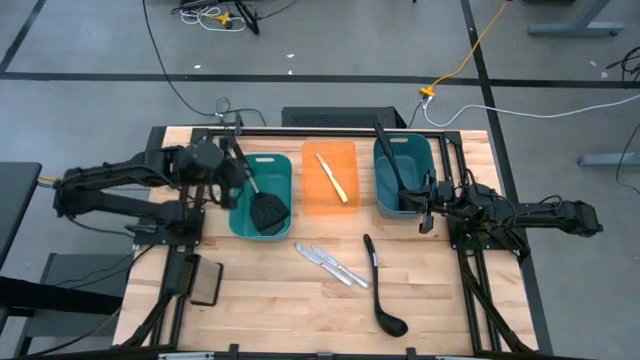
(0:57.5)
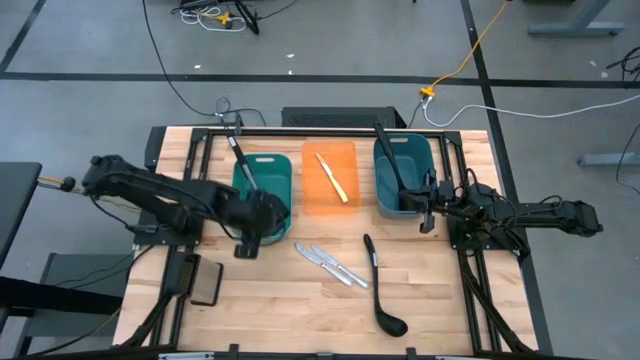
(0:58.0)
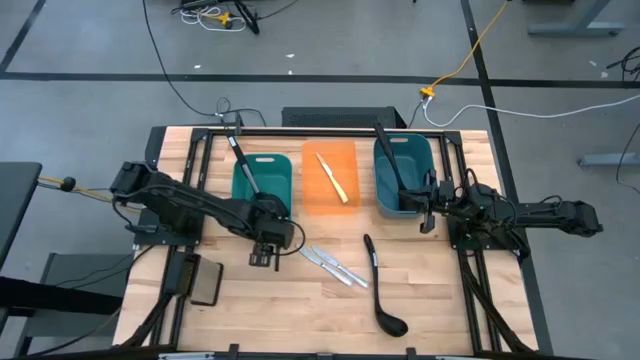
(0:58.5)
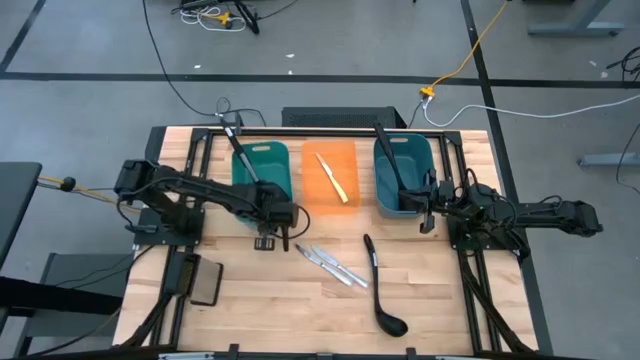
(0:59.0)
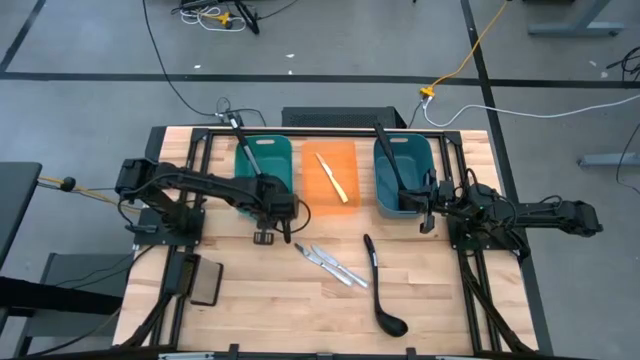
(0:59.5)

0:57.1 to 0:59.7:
Task: Pick & Place Kitchen Items
Adjust the green bin

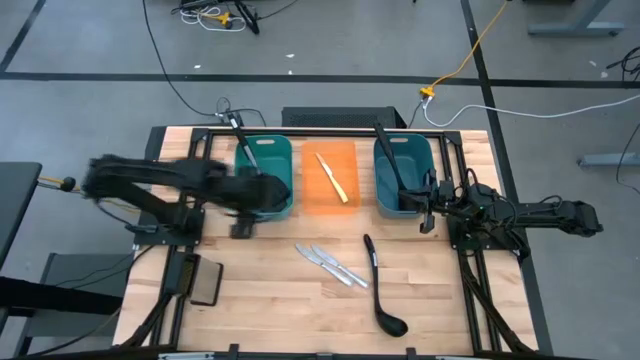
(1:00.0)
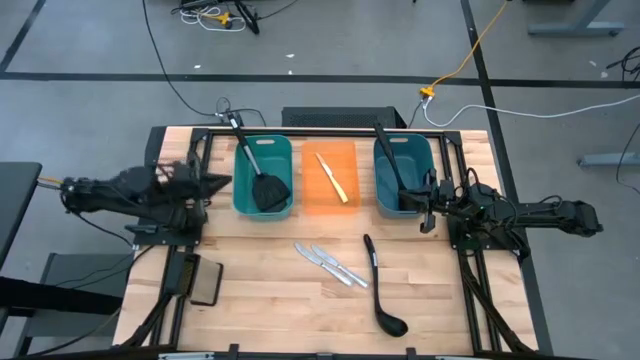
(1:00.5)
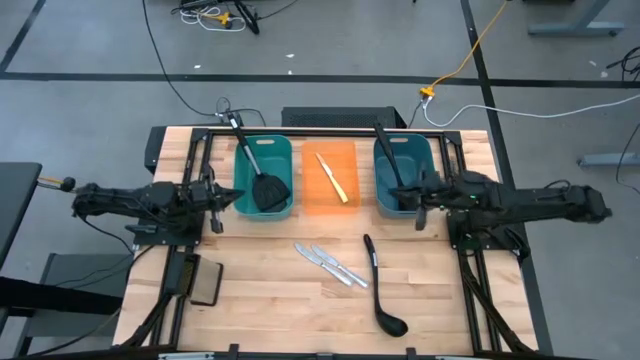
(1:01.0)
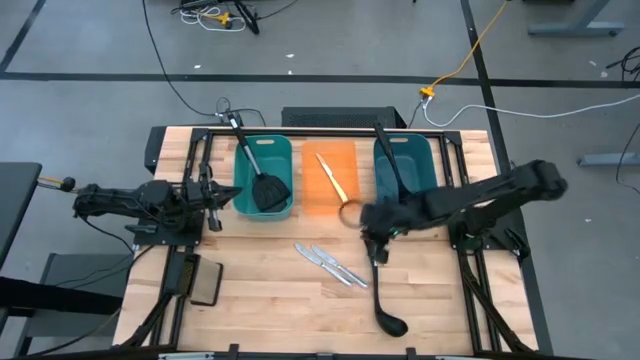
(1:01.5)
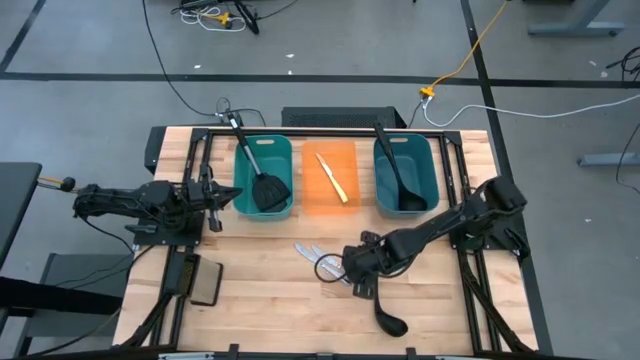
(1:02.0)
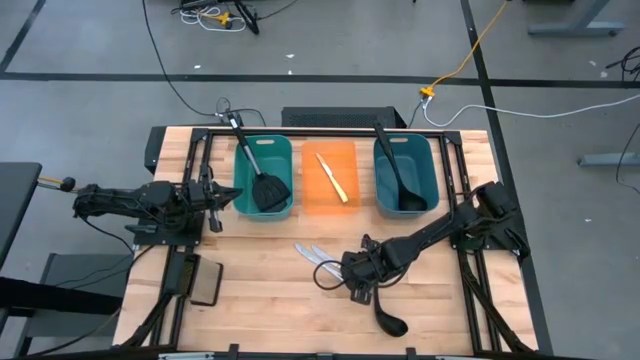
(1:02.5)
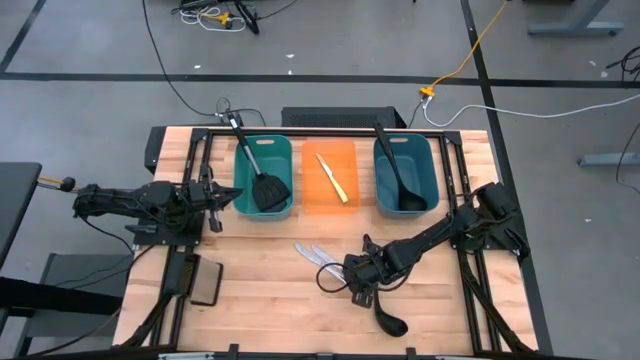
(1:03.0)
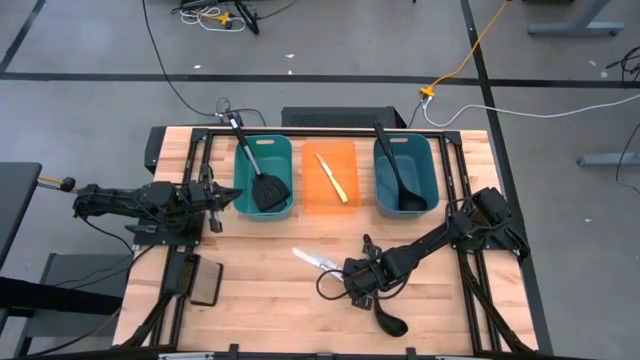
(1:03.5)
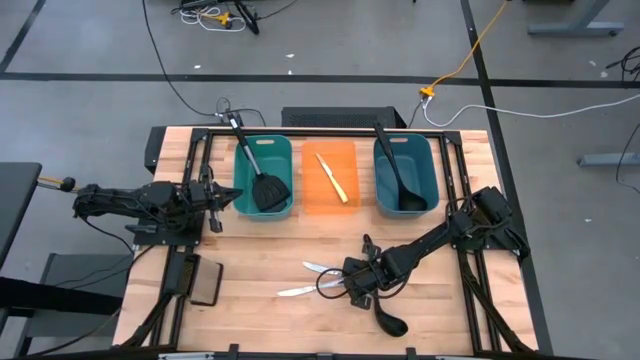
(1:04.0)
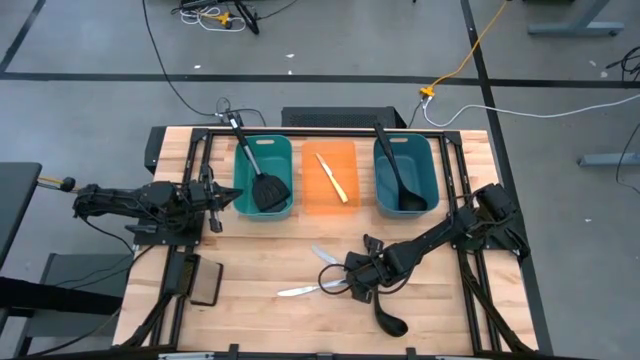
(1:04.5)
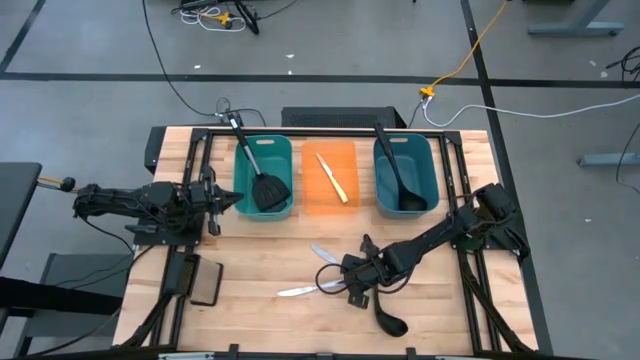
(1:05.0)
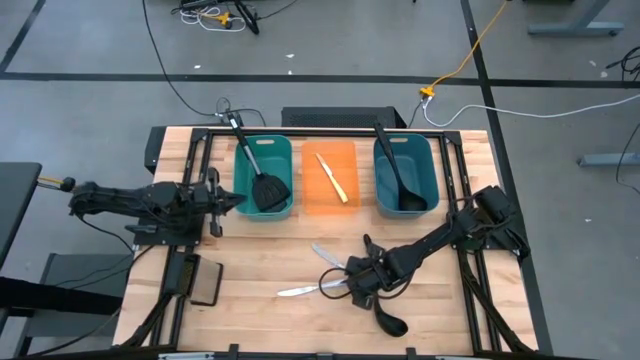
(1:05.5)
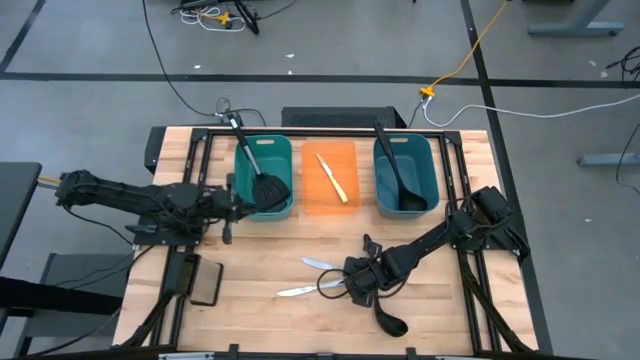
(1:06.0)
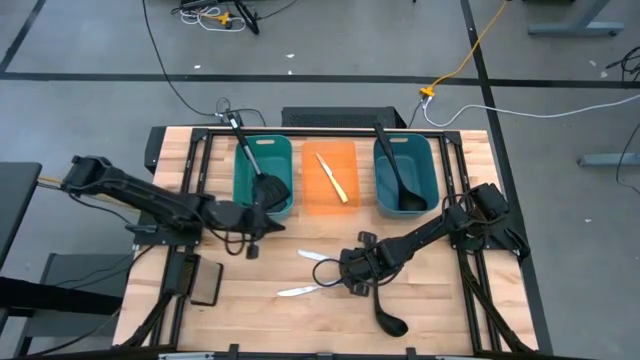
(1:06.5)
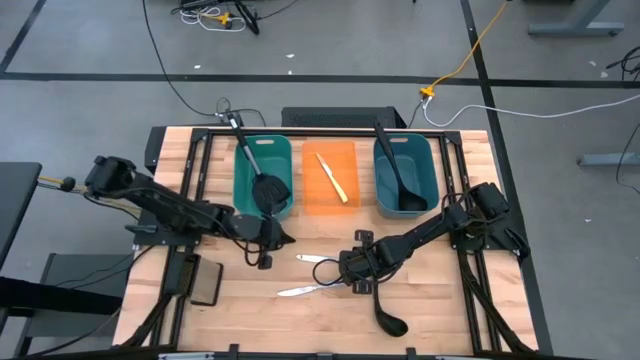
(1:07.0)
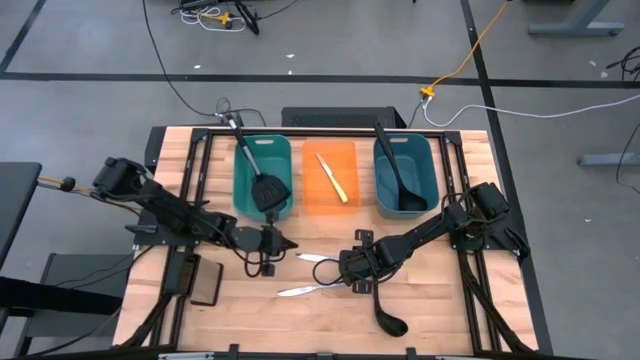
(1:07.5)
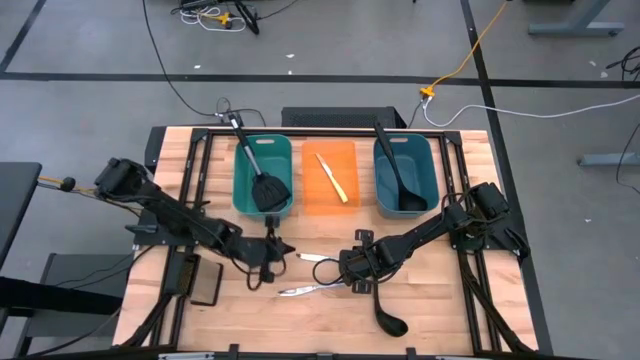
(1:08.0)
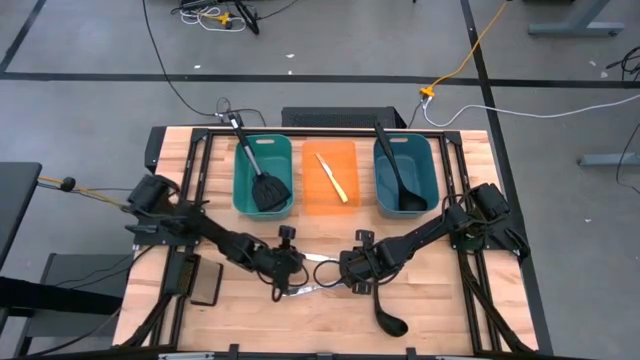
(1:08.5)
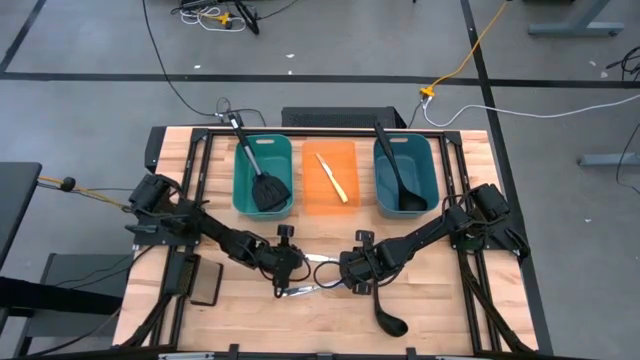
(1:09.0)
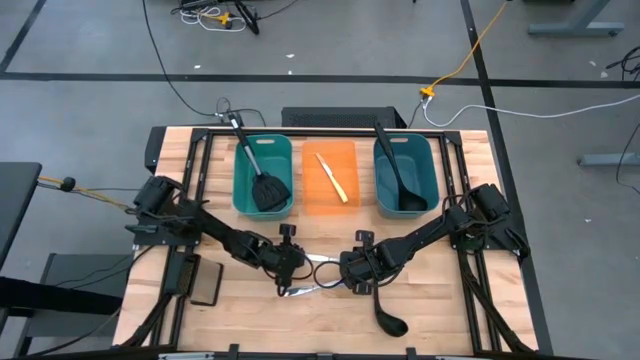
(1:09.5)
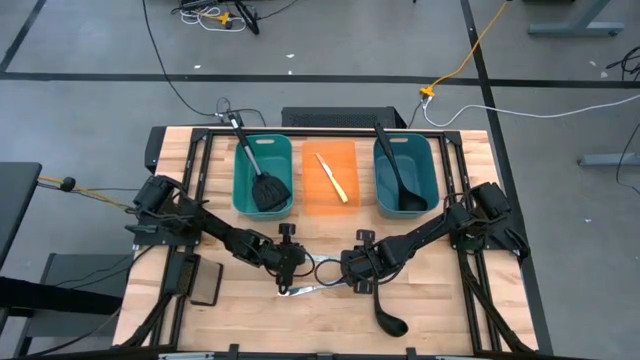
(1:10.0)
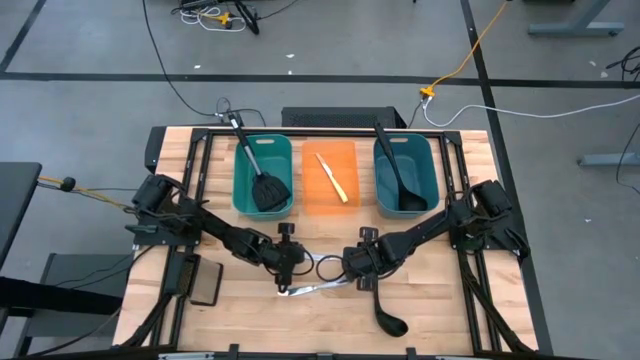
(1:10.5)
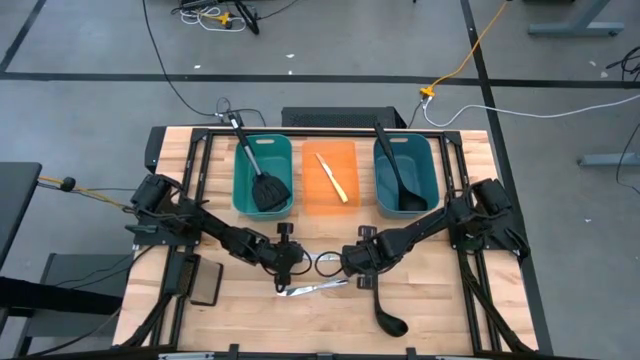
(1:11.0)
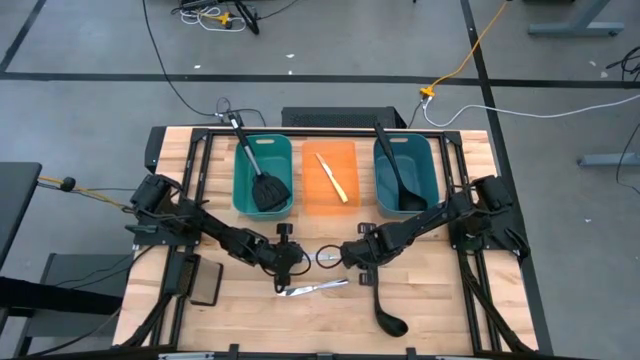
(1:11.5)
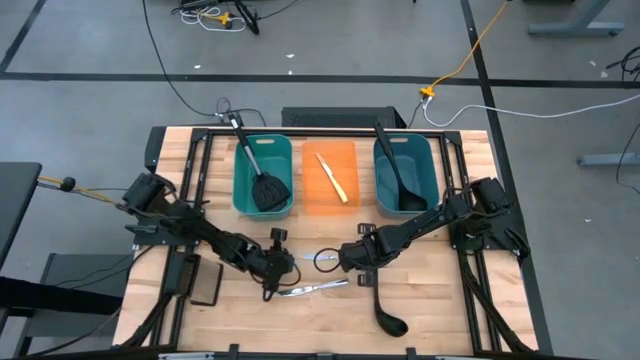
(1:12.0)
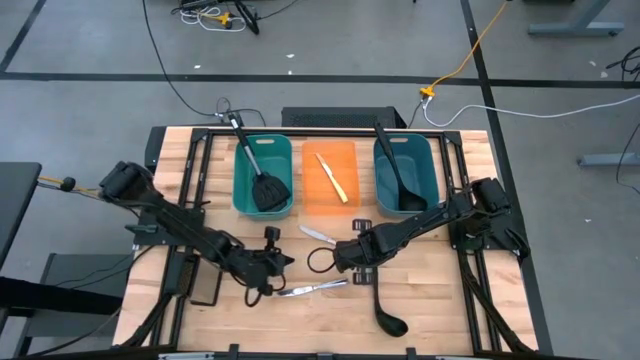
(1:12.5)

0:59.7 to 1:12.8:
Put the top silver knife into the orange bin

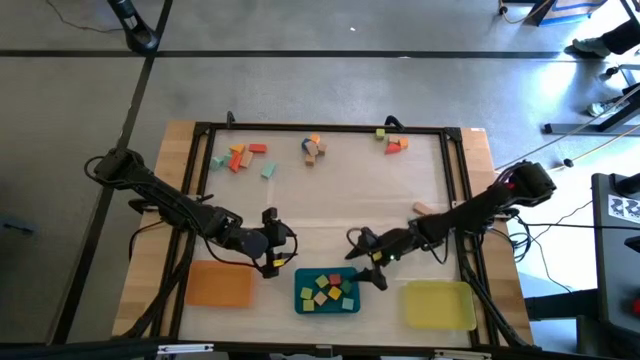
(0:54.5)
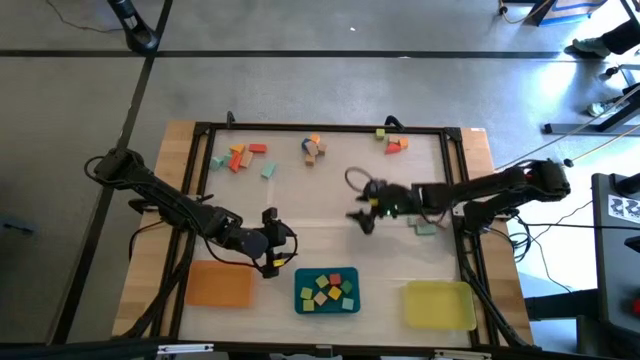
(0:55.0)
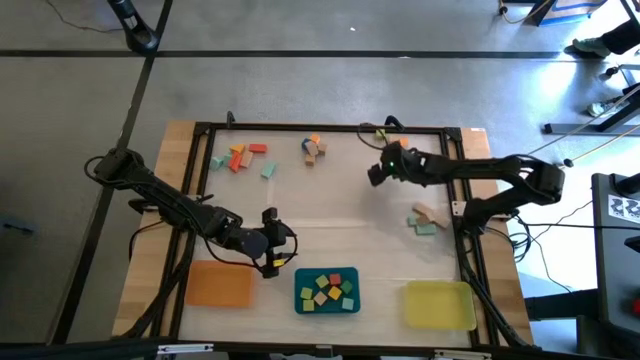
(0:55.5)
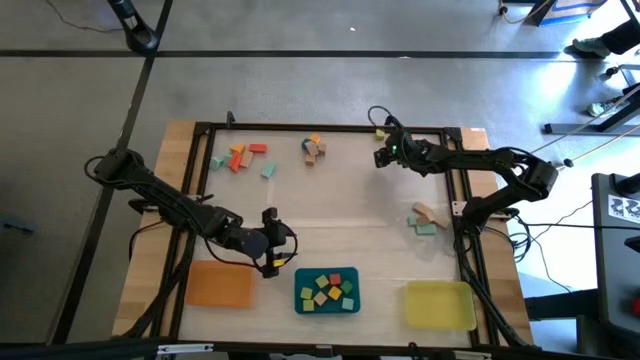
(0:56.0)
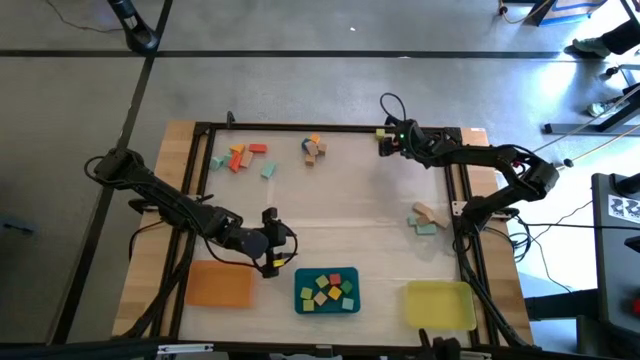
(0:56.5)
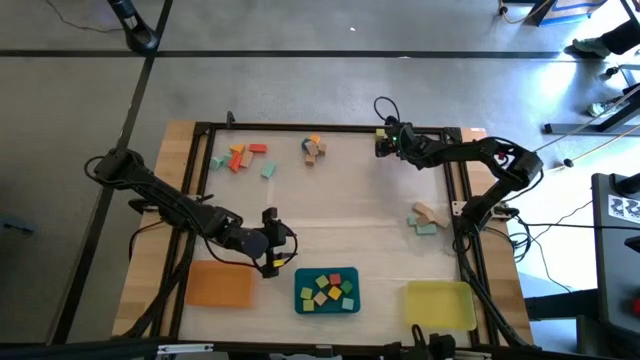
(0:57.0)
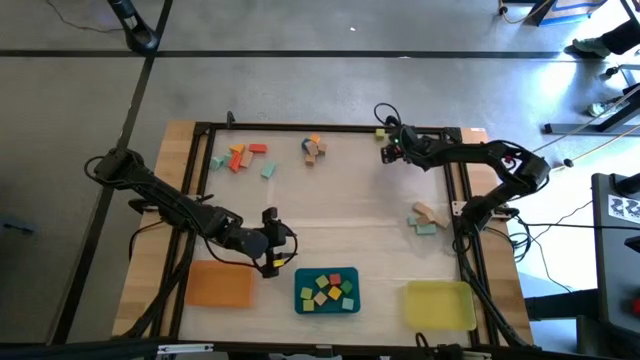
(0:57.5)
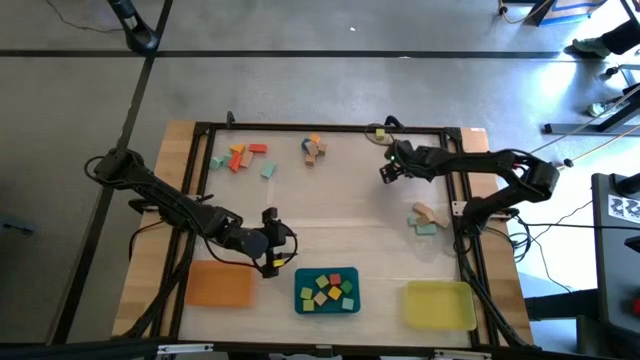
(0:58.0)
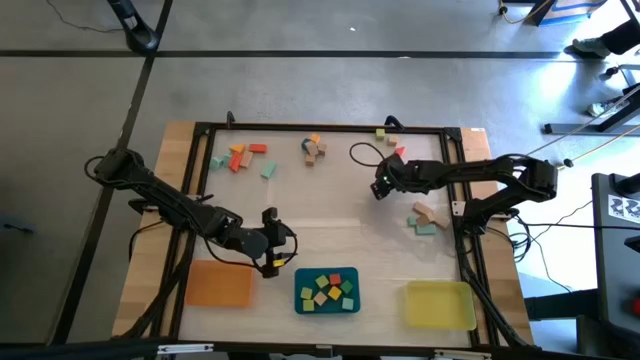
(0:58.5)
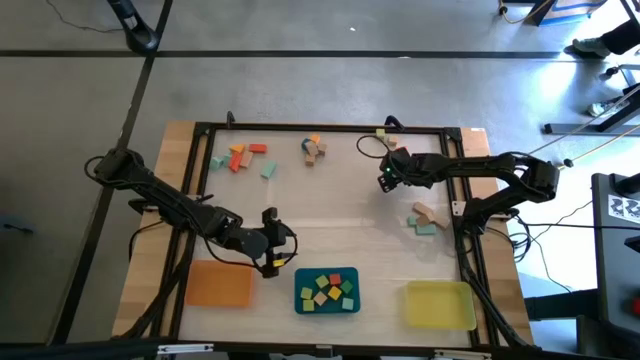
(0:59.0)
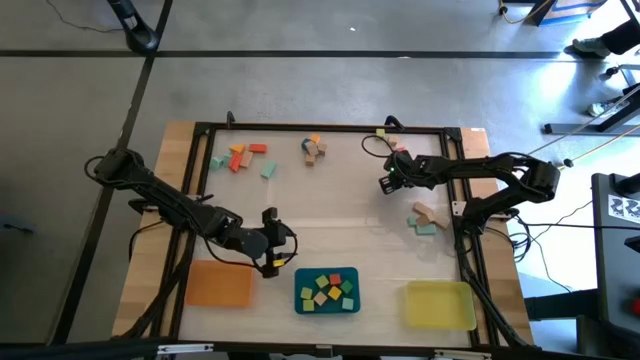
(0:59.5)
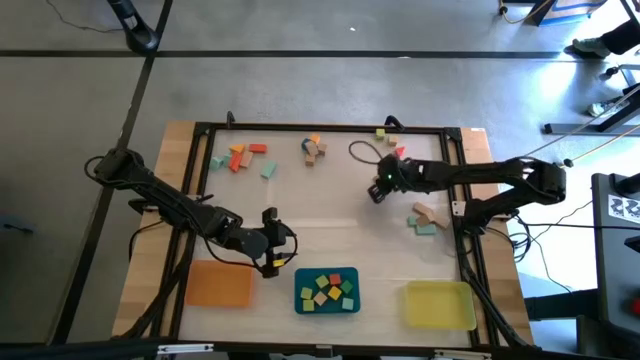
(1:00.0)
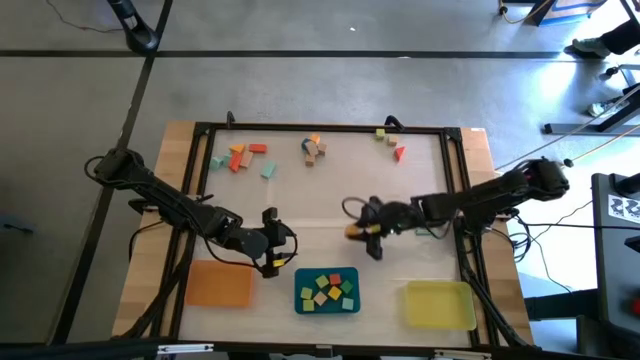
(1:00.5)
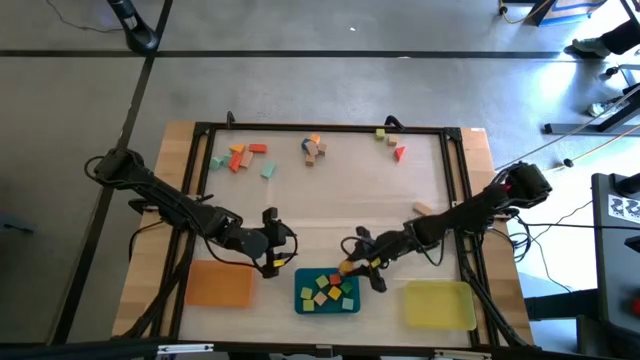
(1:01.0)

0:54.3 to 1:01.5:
Task: Sort blocks by size
Put the yellow cube block into the blue bin
